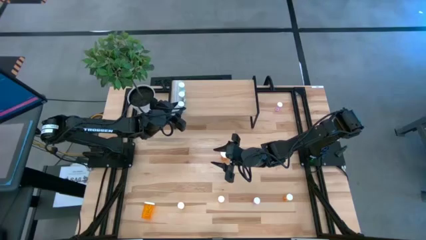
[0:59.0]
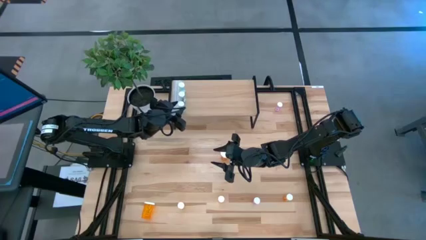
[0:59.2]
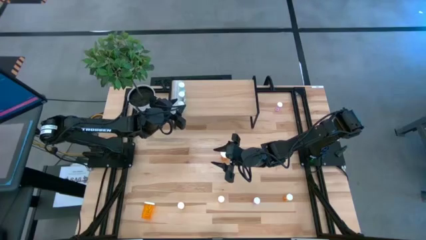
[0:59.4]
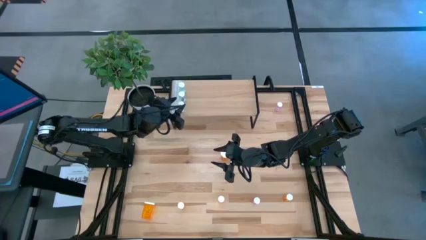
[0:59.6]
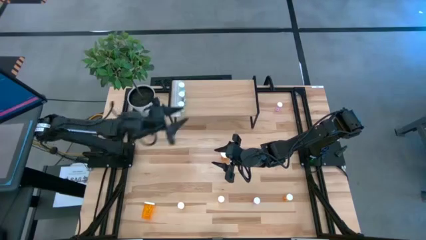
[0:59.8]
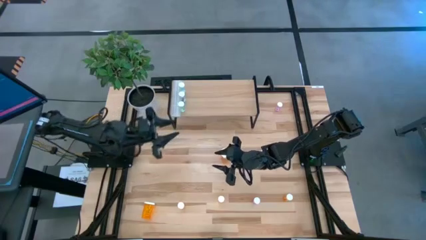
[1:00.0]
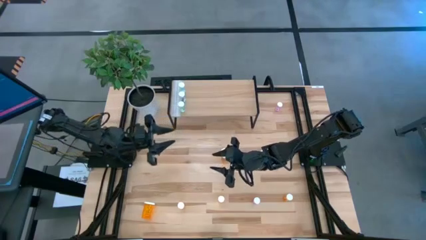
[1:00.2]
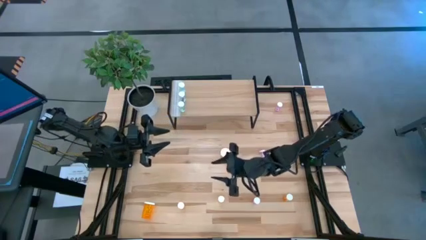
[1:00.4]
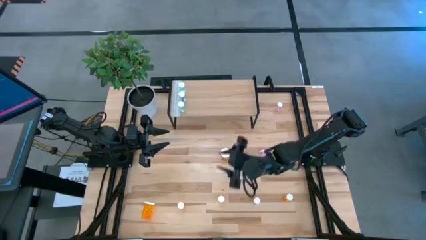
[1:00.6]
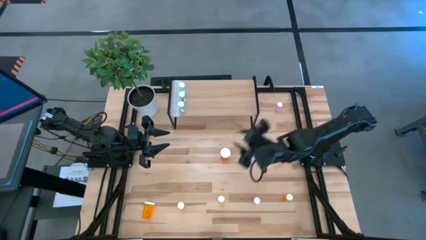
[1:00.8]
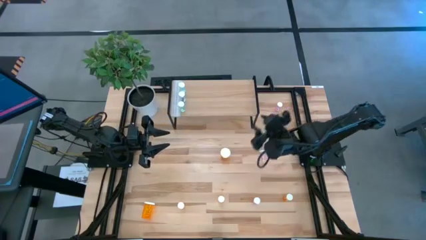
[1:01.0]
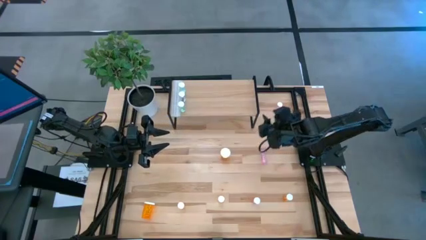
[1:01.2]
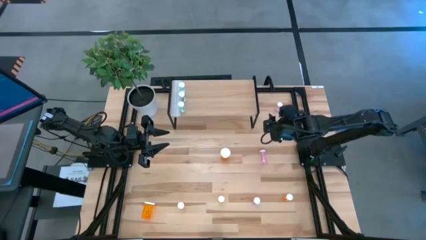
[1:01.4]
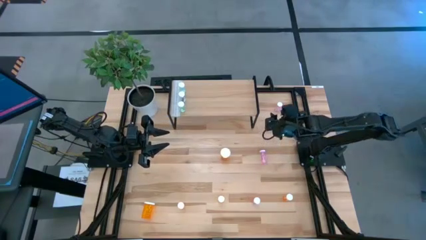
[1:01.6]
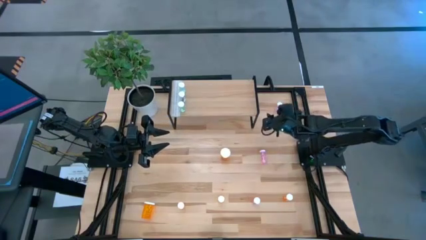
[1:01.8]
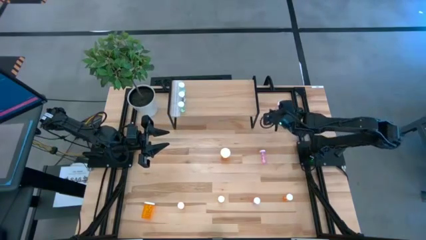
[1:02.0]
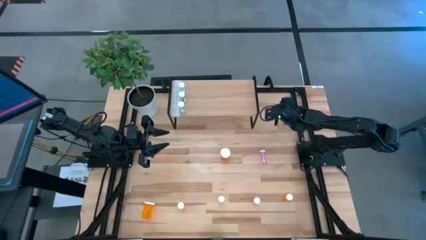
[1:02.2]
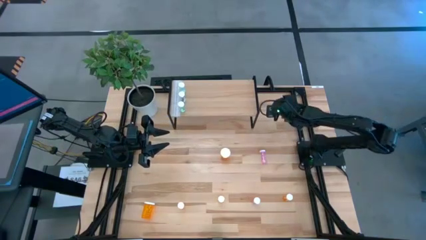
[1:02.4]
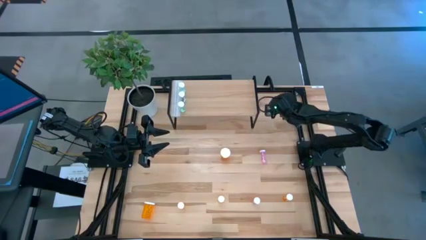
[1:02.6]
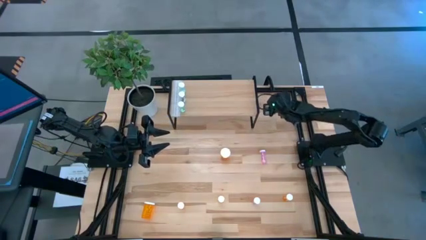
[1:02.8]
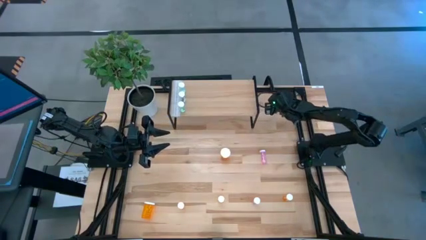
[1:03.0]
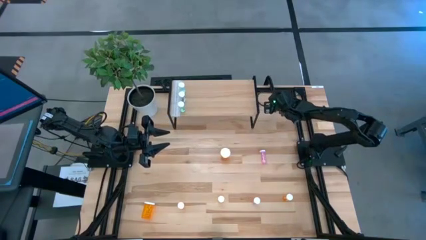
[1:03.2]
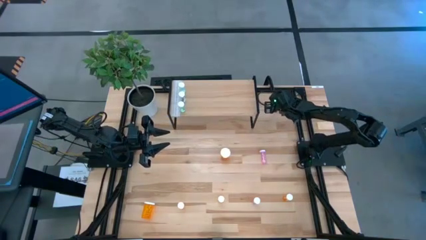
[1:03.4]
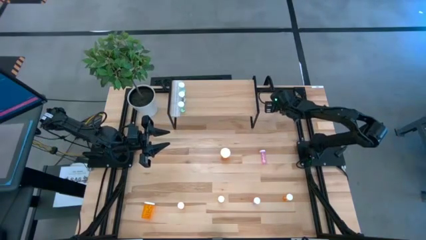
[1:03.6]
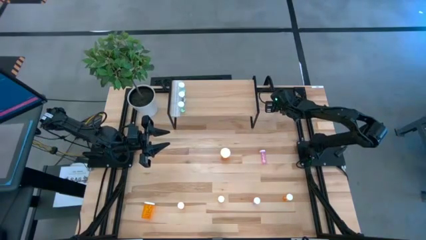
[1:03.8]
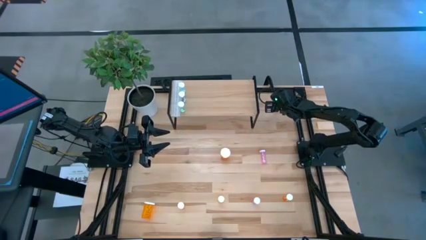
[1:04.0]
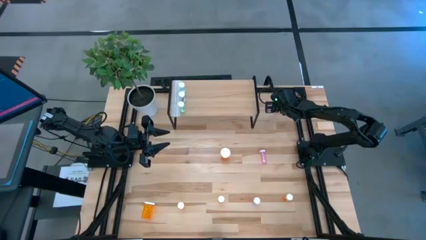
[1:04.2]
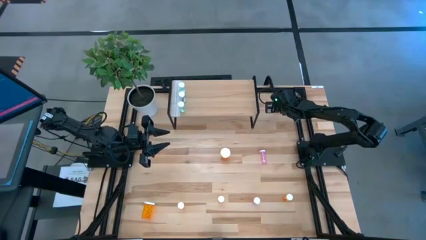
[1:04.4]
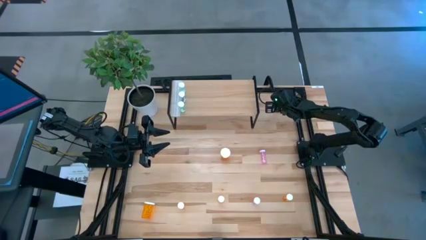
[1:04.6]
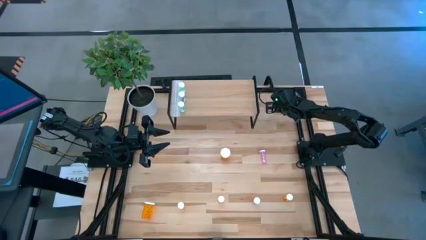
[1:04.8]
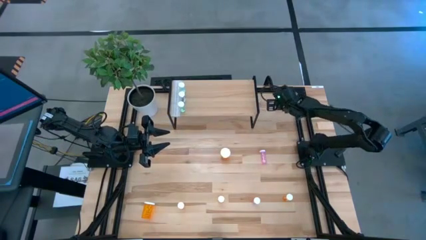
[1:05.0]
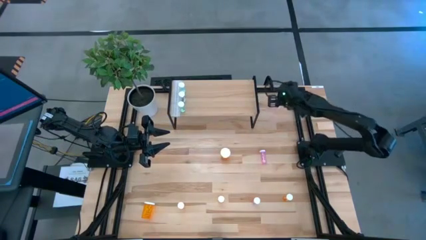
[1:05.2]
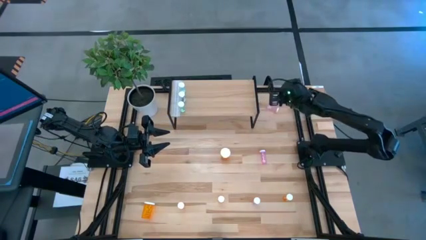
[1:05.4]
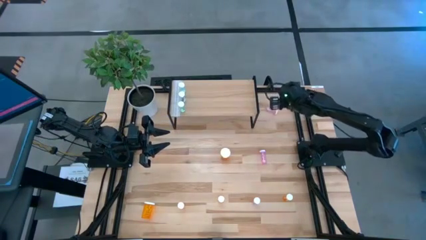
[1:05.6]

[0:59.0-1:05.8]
Task: Pick and place medicine bottles onto shelf by color
Put the top pink pill bottle on the shelf

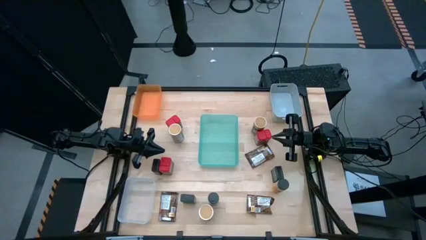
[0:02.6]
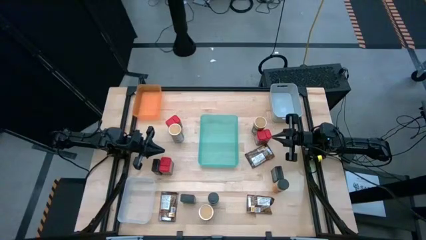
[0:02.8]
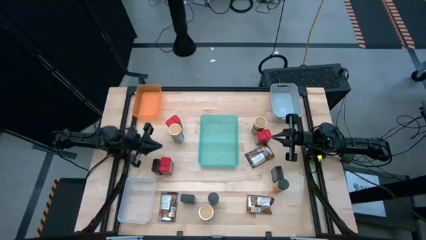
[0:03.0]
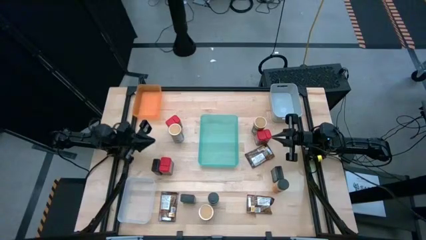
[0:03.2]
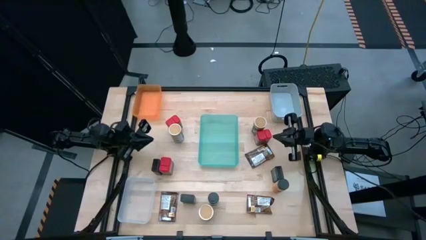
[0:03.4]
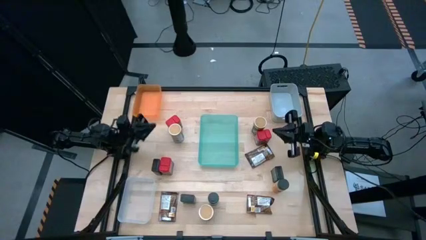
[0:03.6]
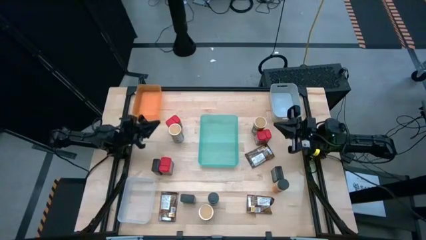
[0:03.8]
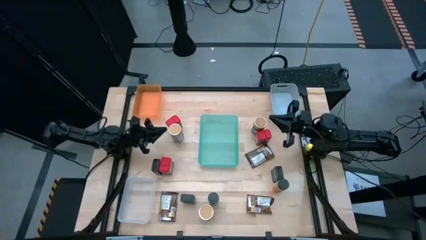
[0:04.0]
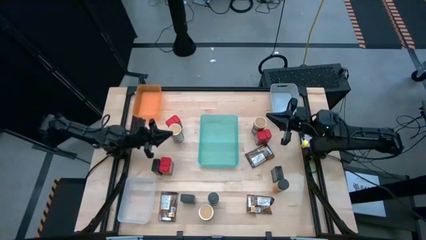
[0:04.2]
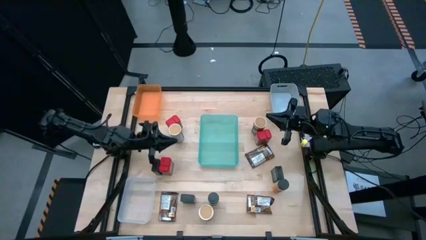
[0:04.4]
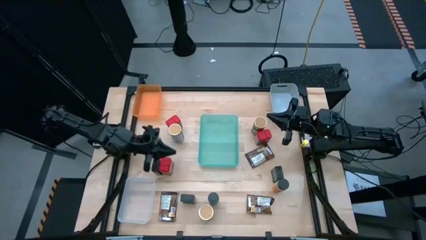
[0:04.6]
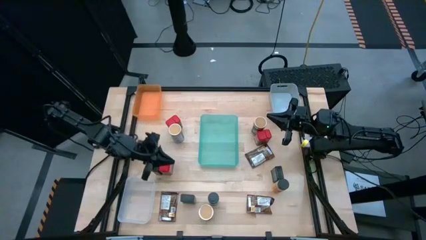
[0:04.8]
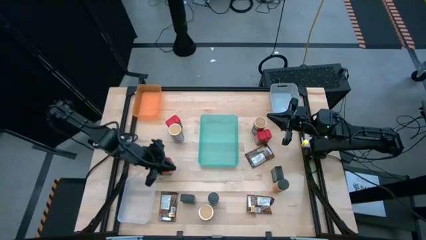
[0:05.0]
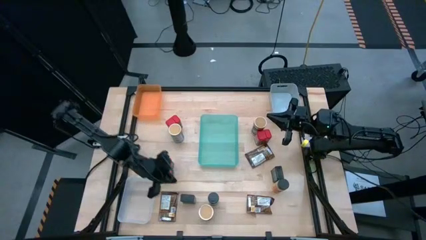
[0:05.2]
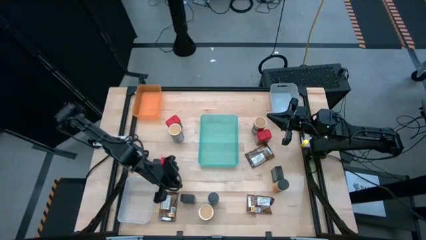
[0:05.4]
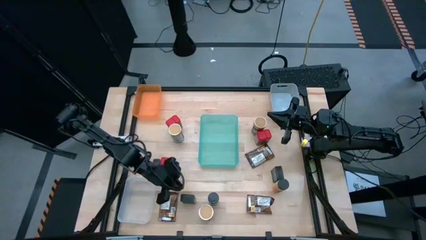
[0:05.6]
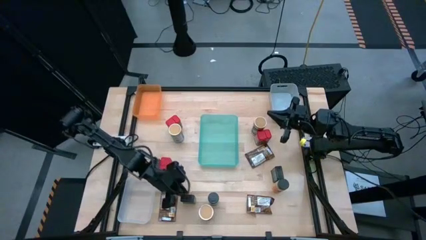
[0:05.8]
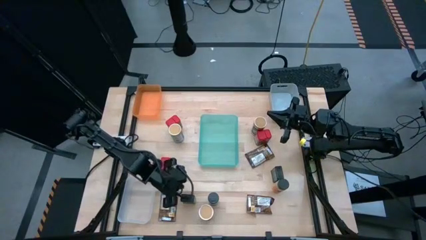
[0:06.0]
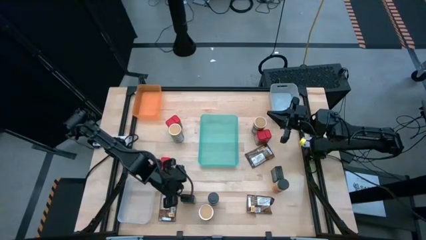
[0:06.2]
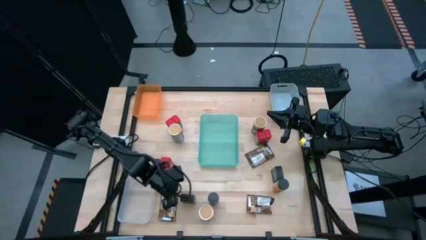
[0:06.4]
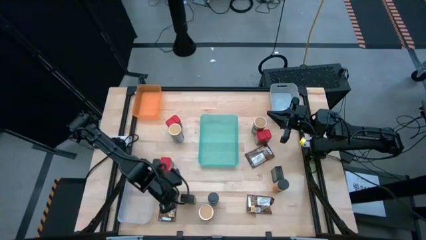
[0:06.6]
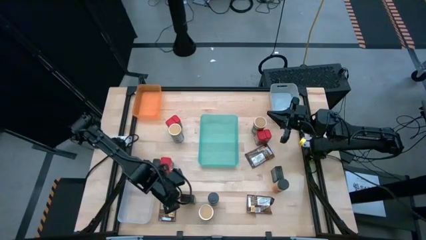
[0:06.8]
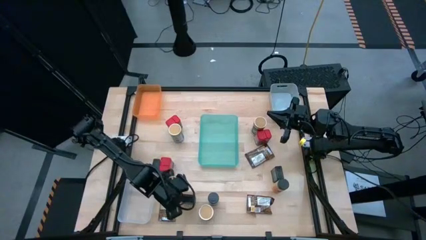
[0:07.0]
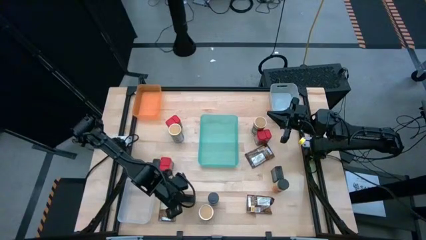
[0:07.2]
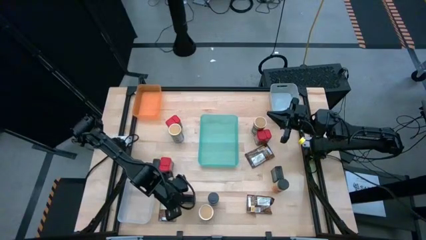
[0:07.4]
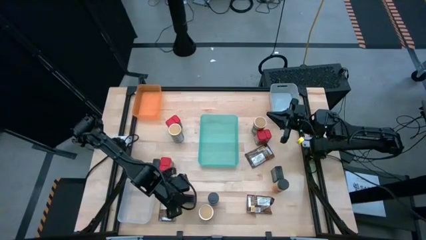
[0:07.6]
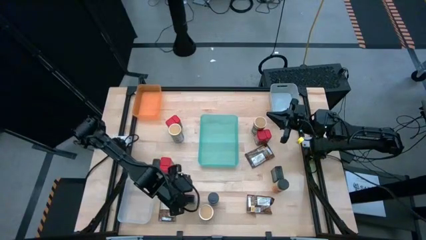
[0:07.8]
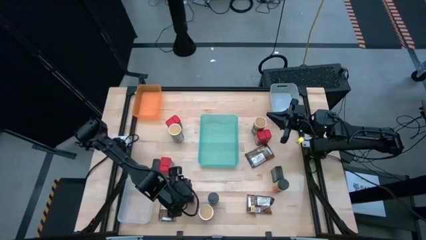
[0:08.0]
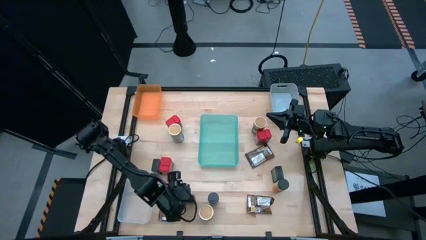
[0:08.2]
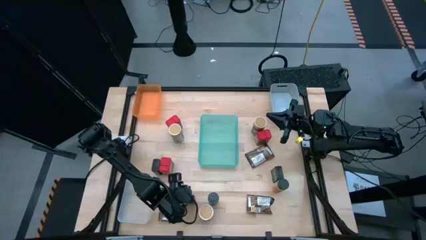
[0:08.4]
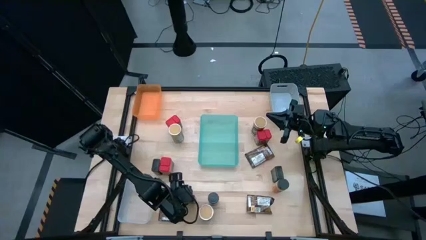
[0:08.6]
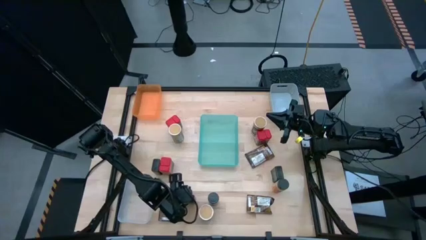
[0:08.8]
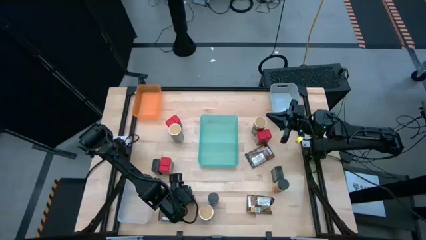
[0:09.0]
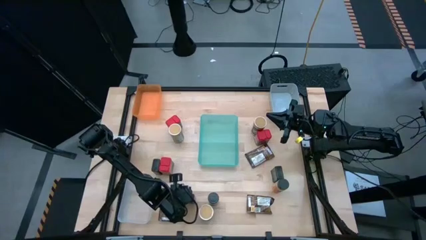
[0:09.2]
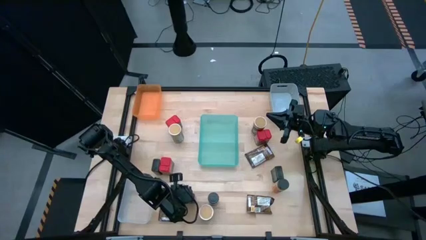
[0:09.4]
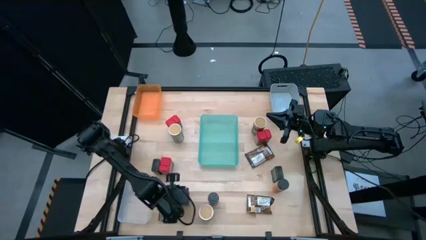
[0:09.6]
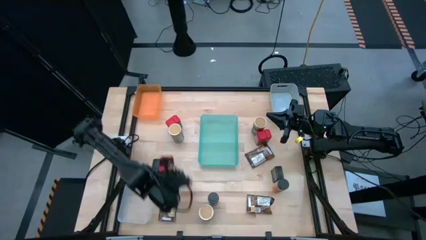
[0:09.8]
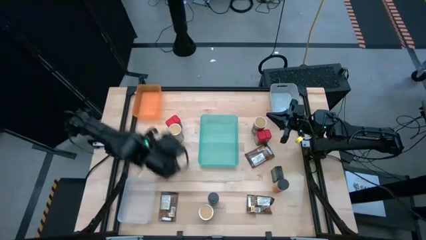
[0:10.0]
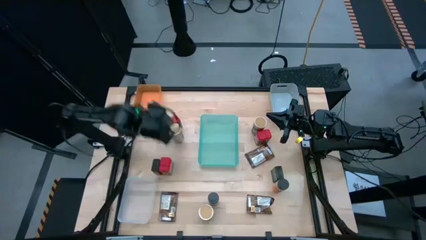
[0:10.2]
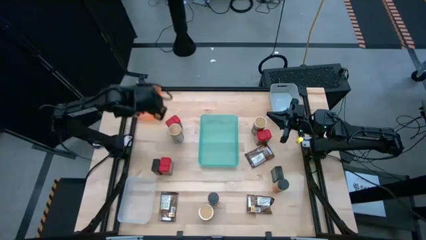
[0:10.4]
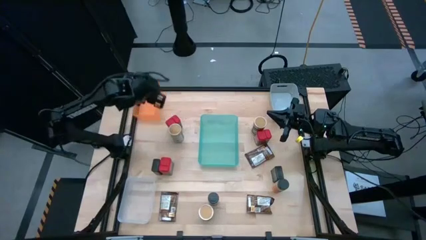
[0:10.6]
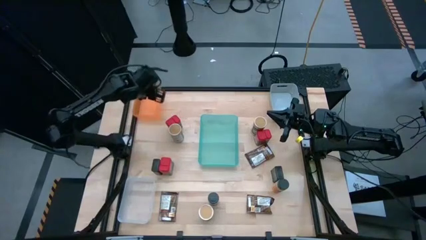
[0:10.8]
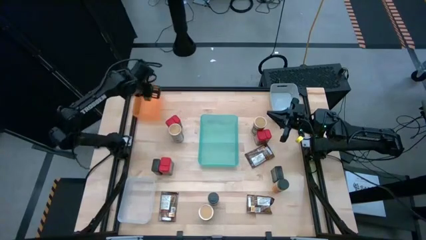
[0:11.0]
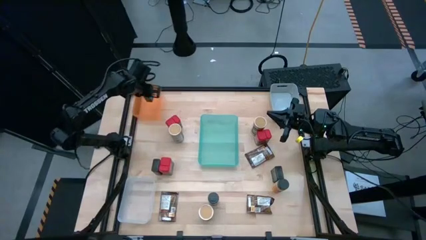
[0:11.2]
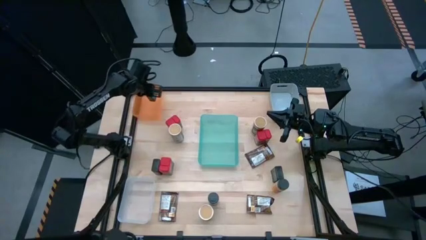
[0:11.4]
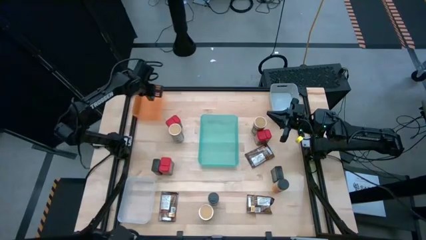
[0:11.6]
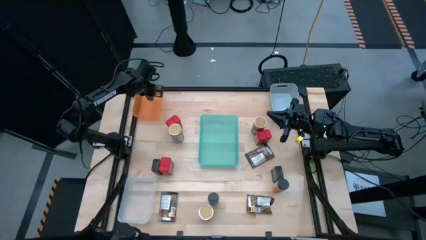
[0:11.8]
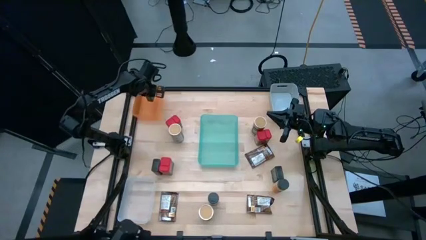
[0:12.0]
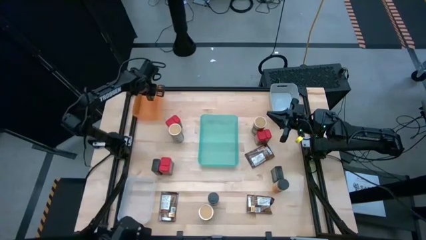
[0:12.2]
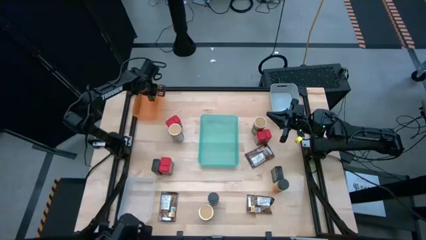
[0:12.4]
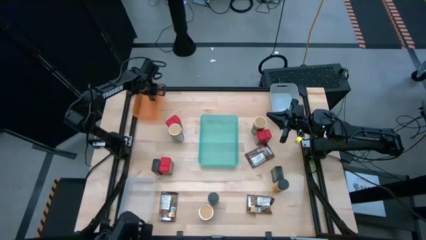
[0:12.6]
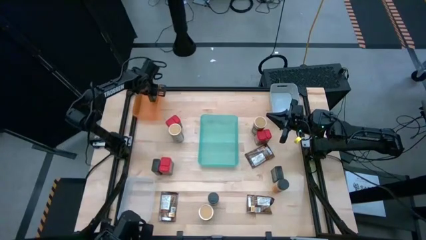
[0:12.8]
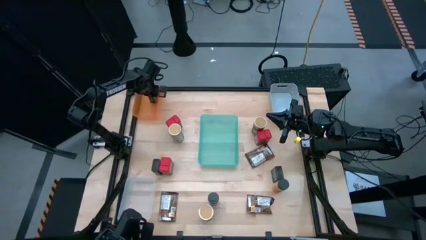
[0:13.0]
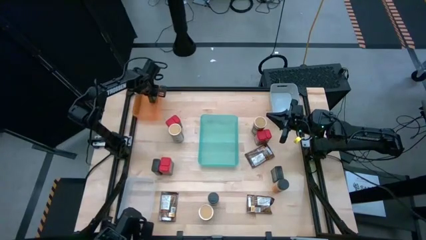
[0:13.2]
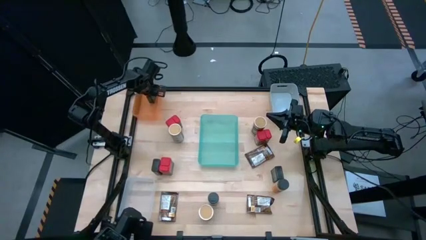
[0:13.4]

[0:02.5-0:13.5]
Task: Sort spices by type
Put the bottom black seasoning can into the orange bin
